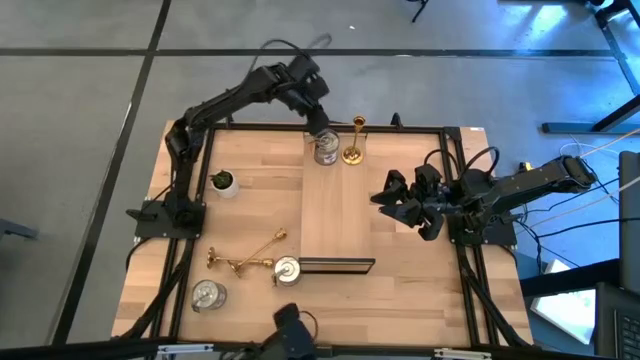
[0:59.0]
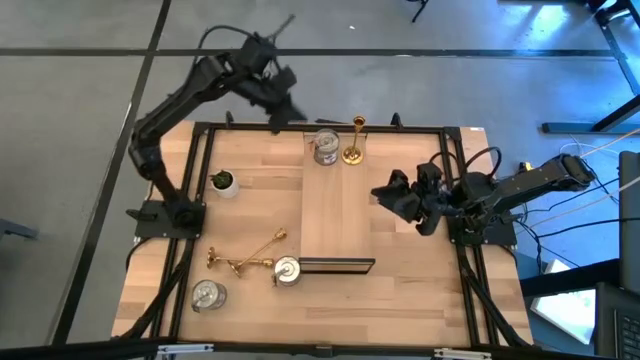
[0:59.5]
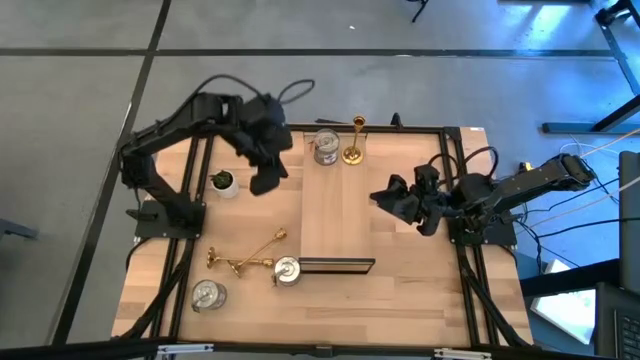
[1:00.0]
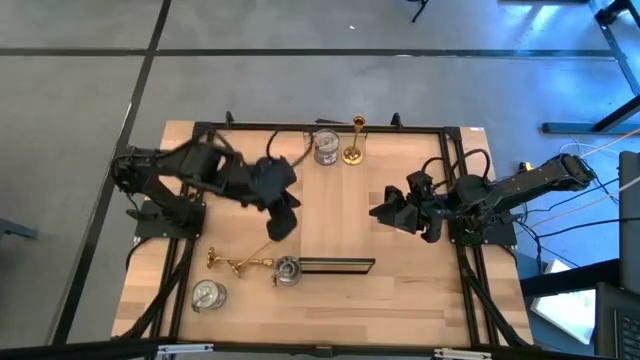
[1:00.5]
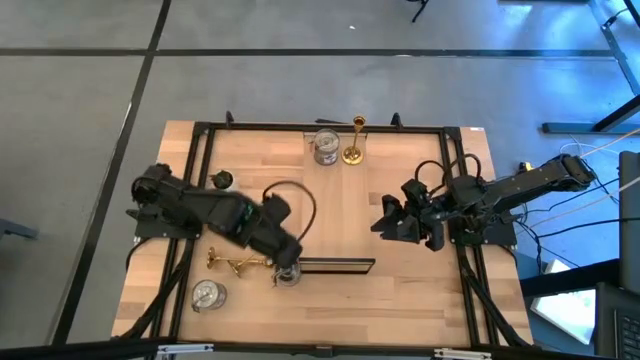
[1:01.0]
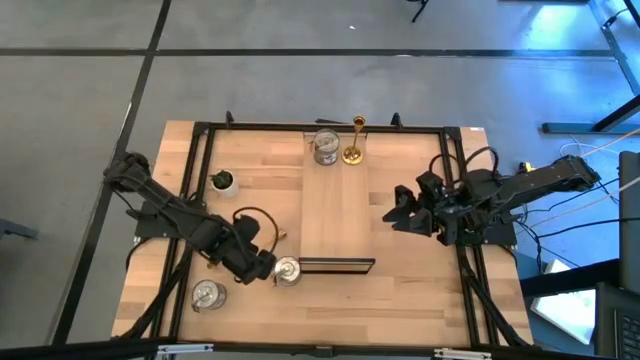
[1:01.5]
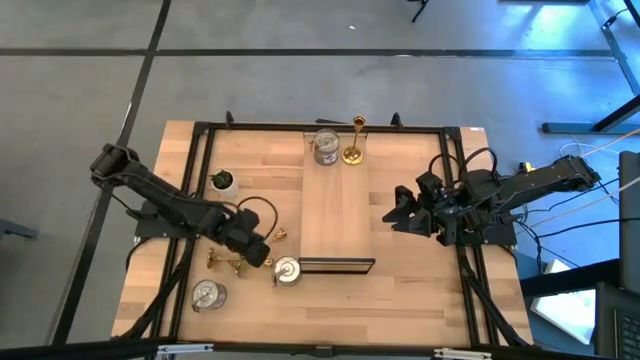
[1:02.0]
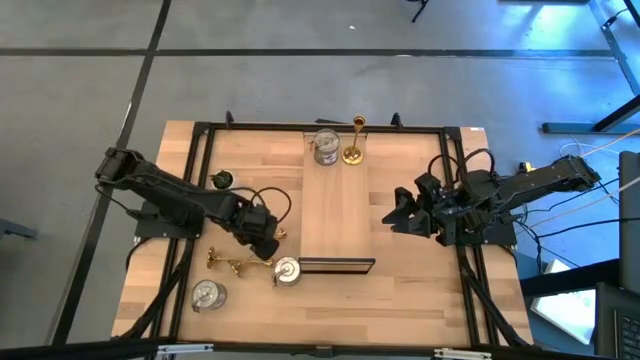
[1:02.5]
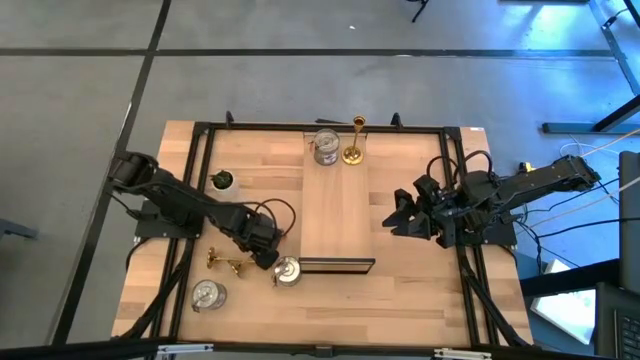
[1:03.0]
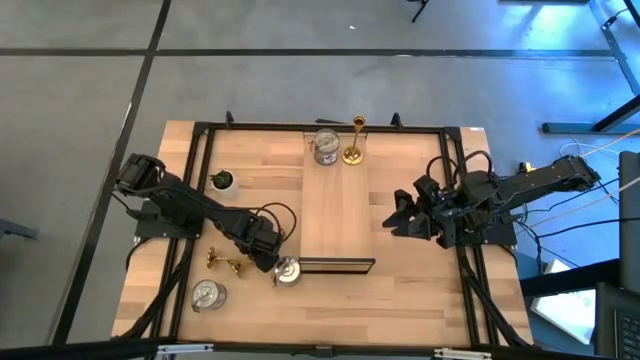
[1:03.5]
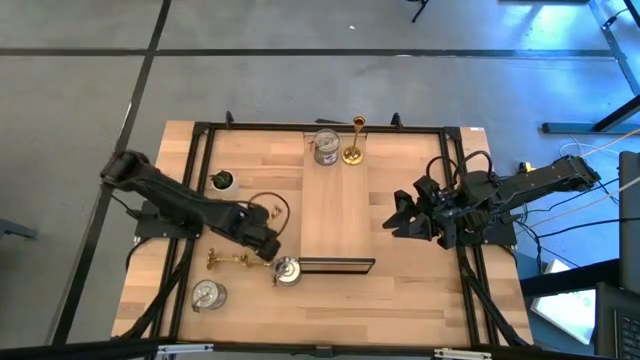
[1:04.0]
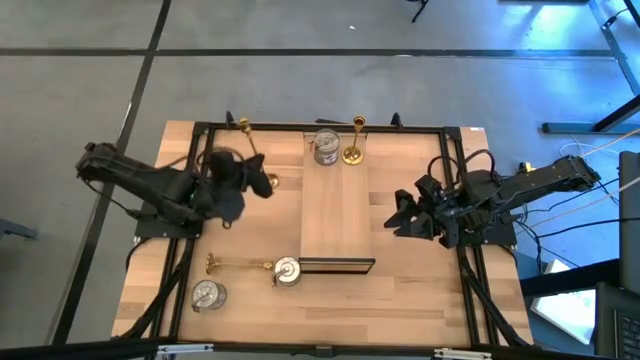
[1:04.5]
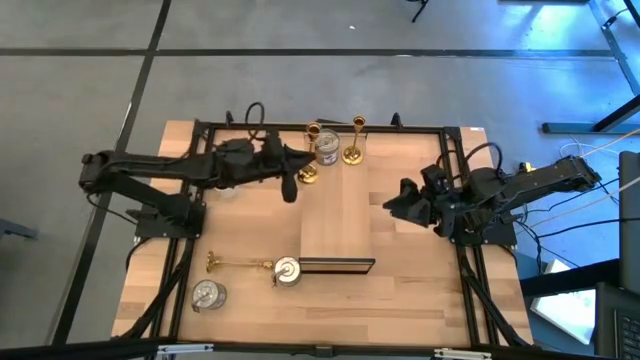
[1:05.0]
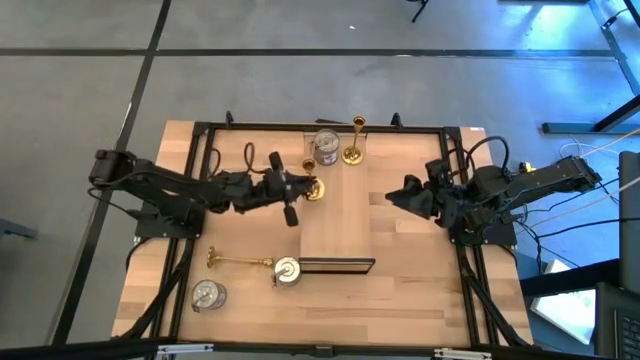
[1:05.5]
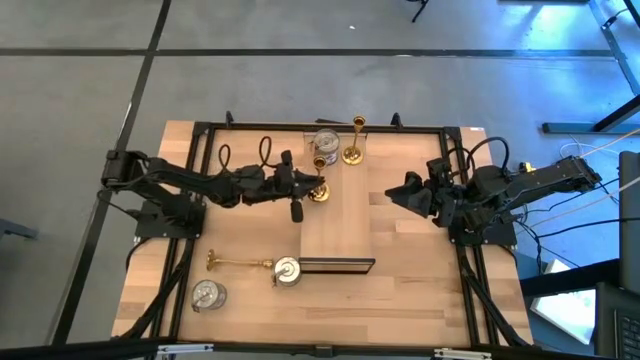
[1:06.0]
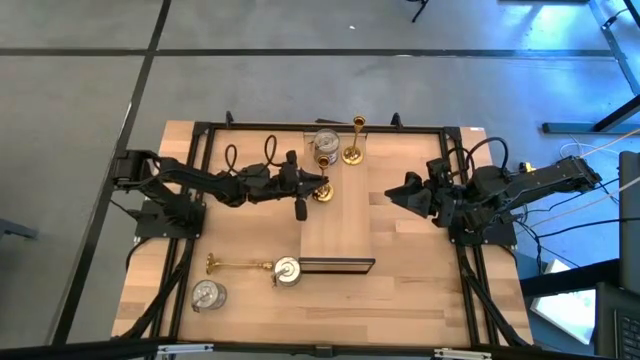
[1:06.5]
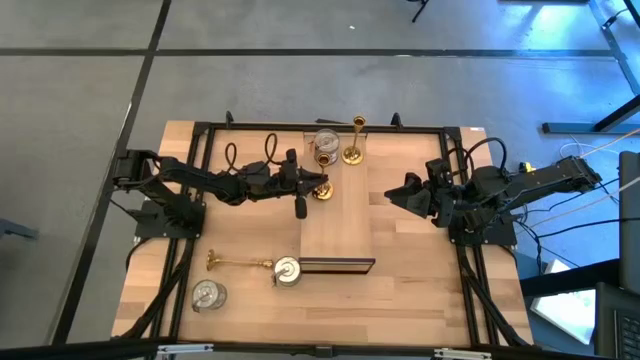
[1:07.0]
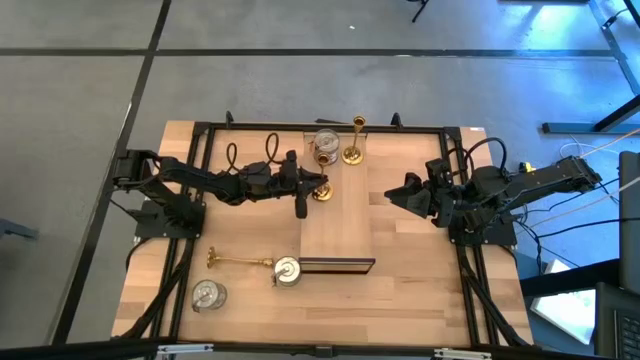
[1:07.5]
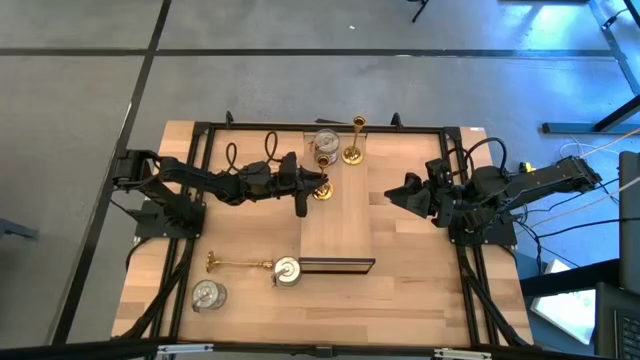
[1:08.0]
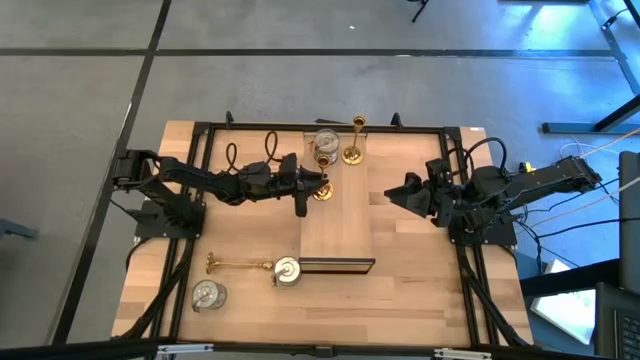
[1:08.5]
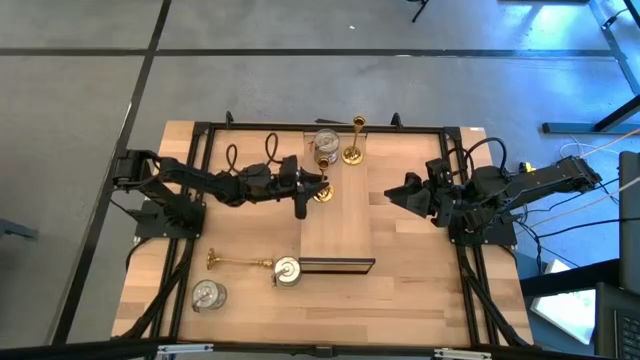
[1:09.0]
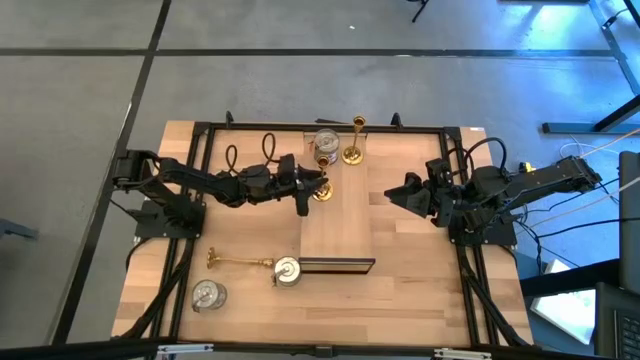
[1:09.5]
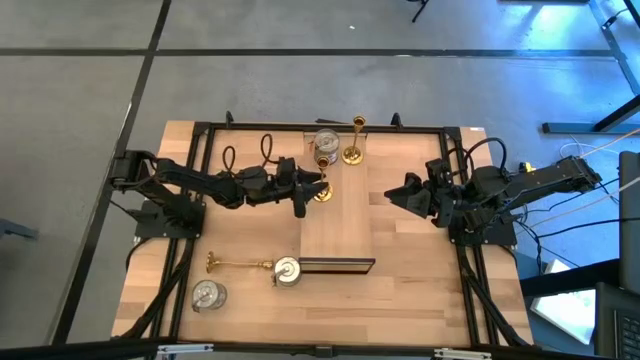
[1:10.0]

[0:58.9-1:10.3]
Task: Pick & Place candle stick holders
Put the right gold candle holder on the shelf

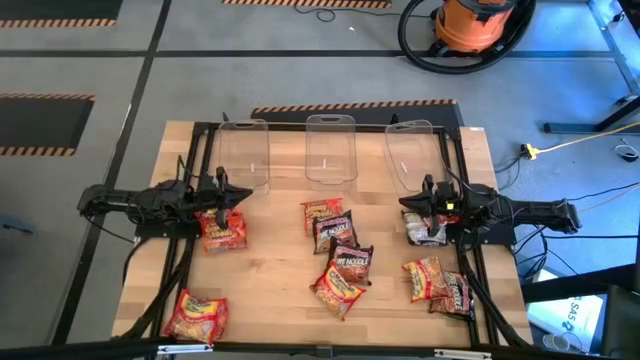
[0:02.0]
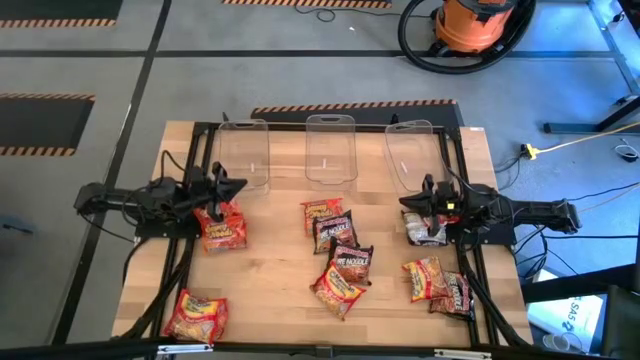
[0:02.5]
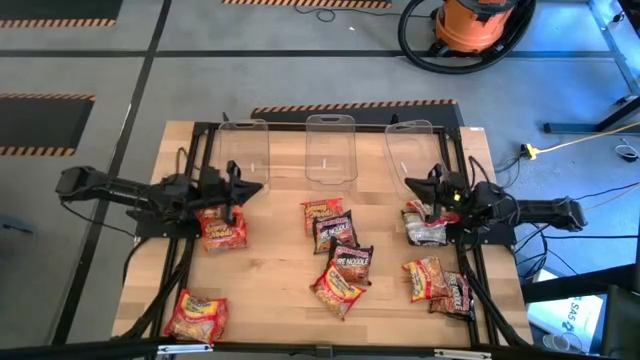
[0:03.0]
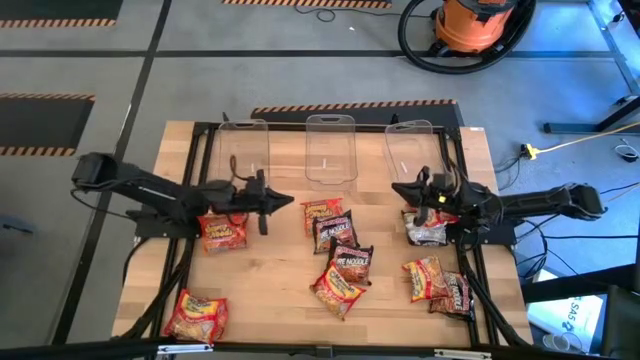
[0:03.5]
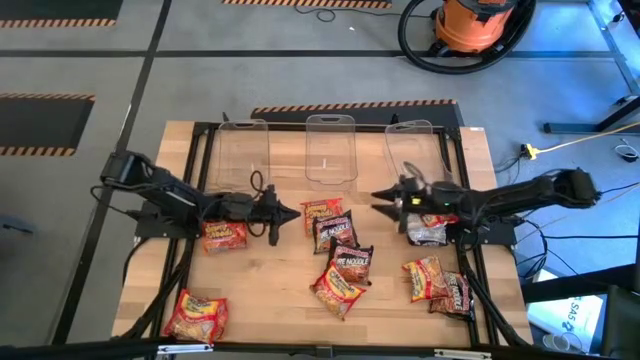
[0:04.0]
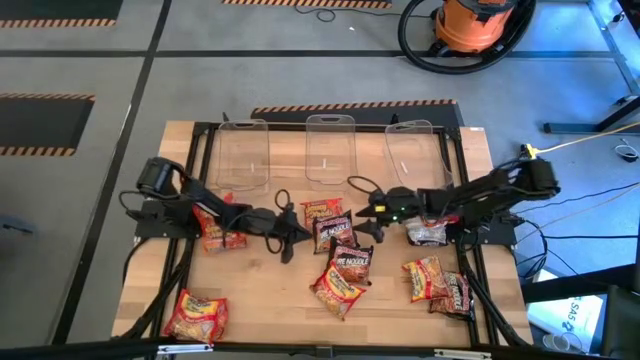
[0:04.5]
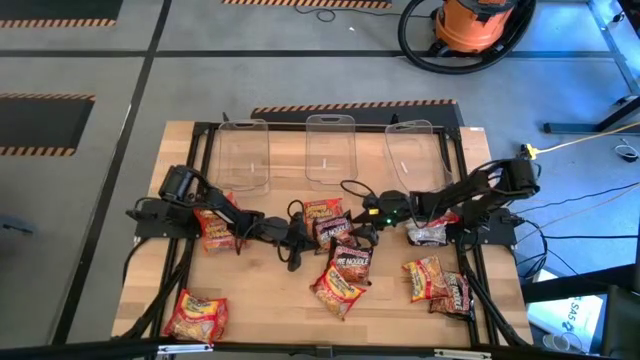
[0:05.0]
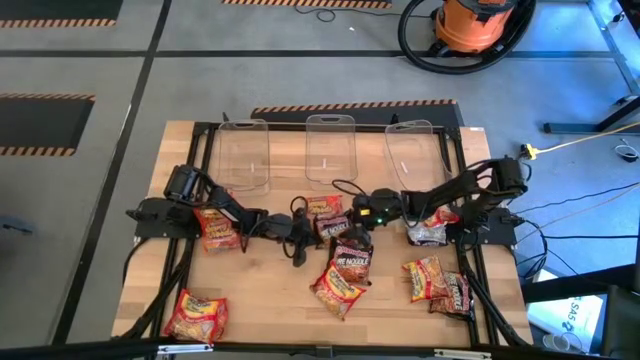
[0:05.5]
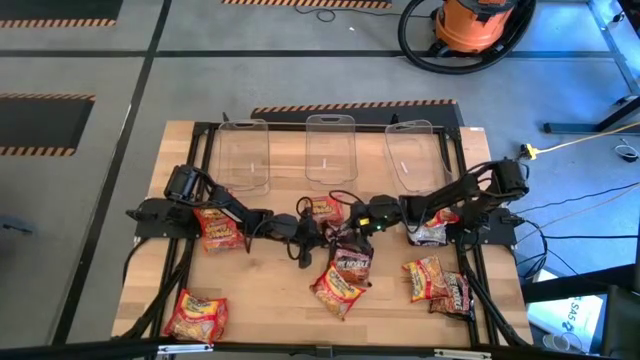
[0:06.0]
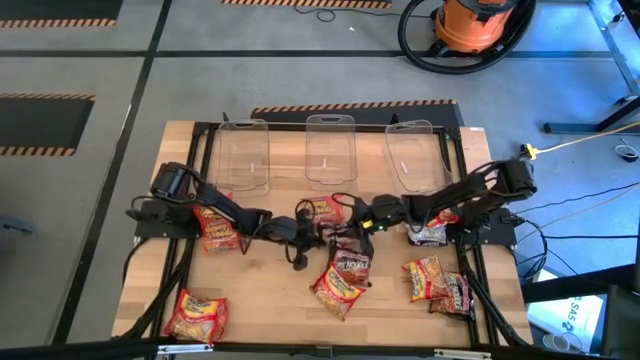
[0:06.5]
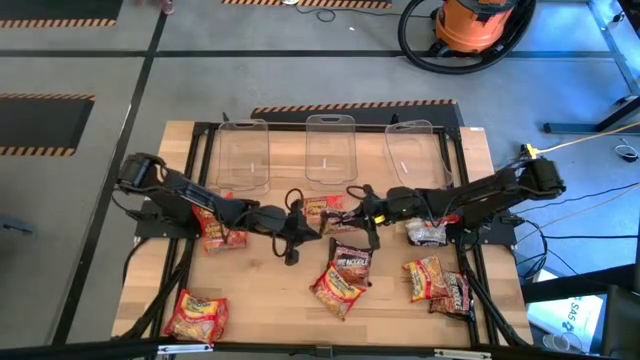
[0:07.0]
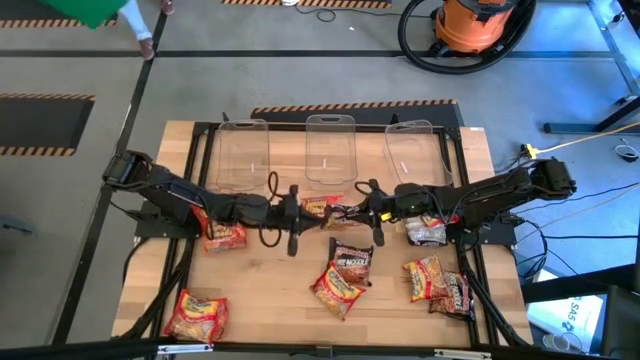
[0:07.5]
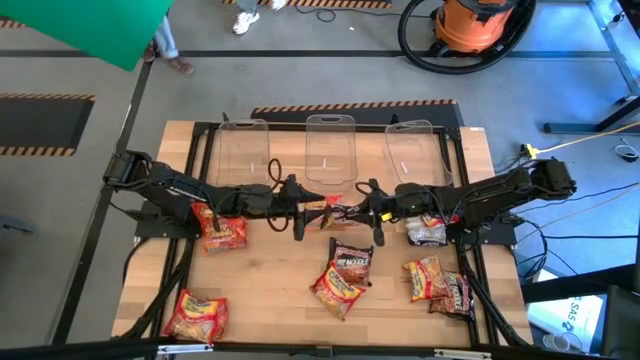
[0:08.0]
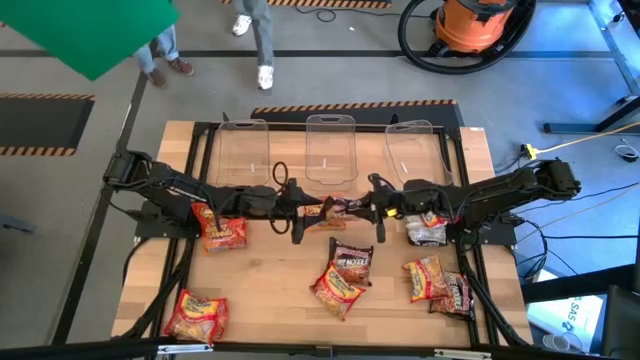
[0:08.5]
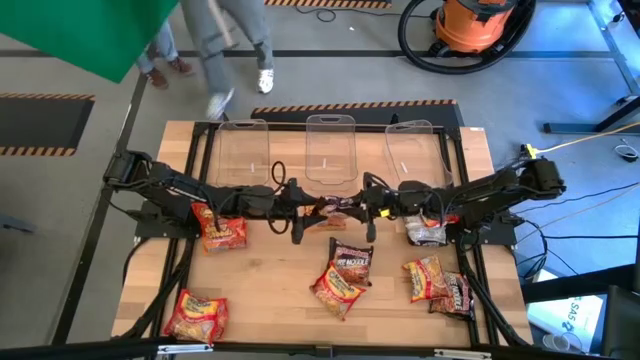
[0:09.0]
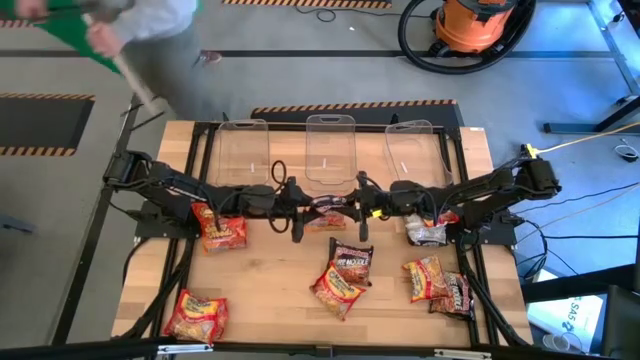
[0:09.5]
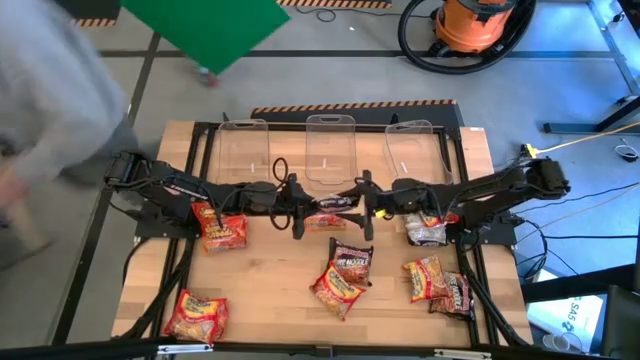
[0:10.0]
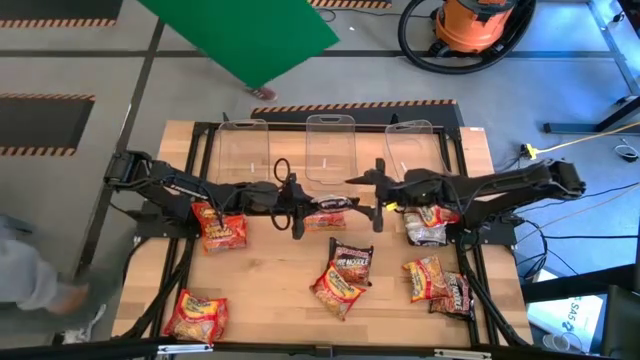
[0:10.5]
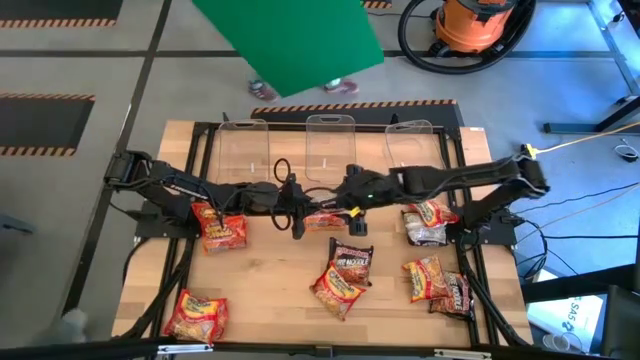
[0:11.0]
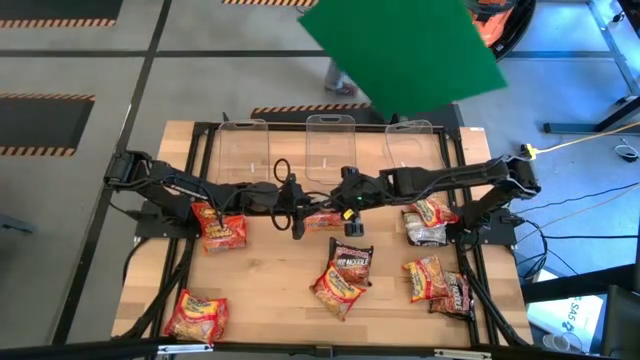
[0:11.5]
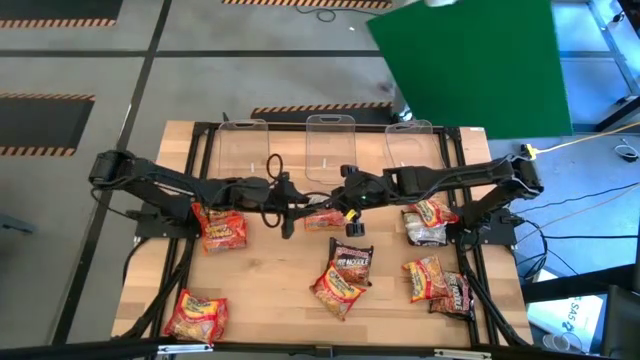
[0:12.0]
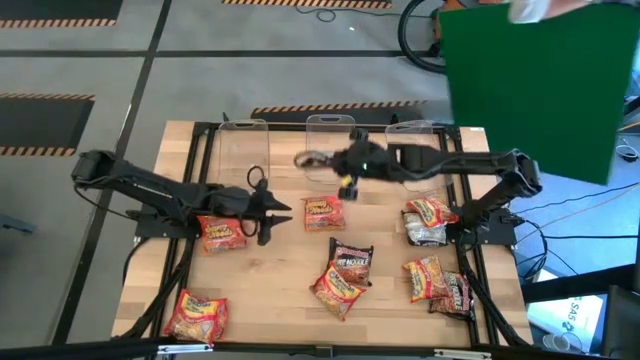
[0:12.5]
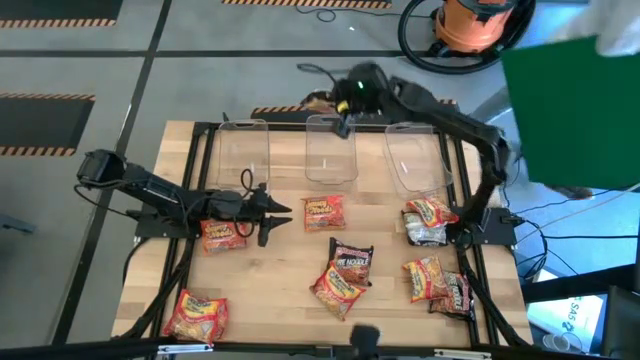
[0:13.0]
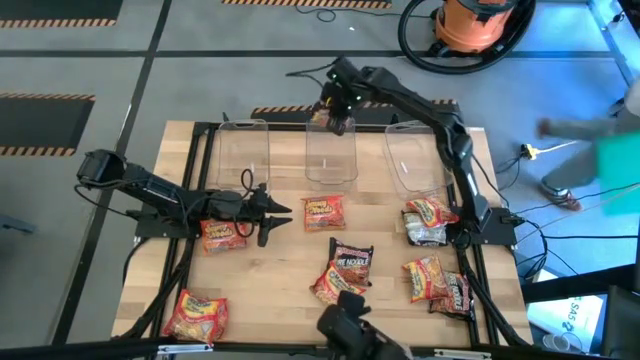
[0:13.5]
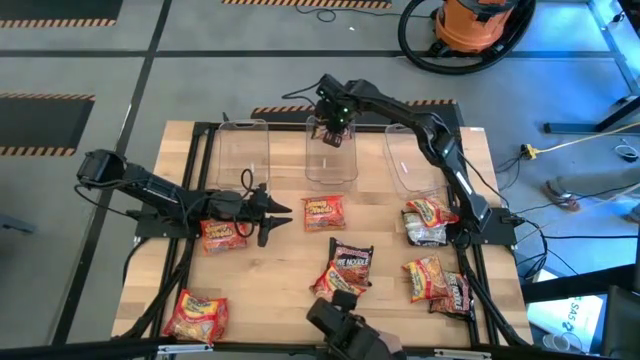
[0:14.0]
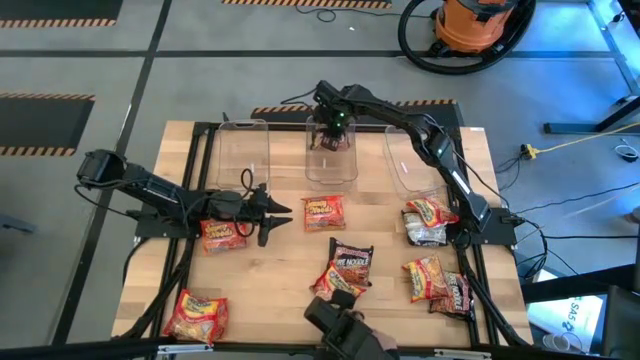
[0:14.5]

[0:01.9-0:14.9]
Task: Sort Maruchan noodles
Put the black noodle pack into the middle transparent bin
